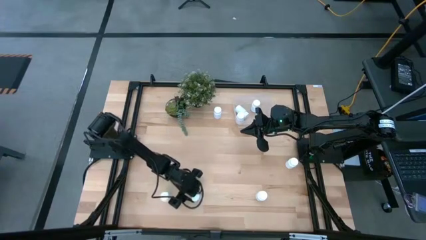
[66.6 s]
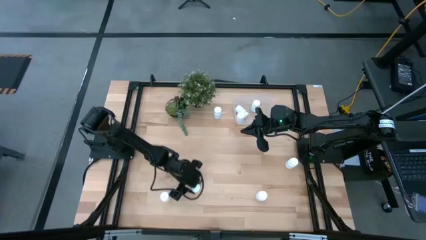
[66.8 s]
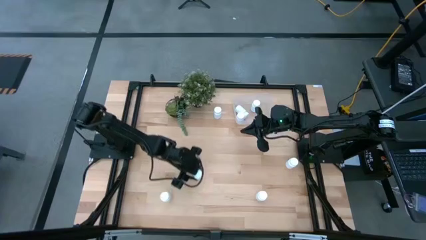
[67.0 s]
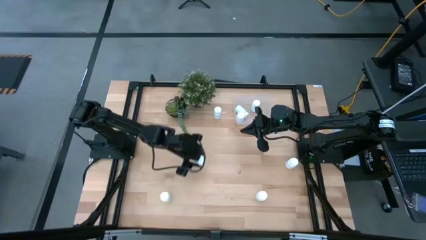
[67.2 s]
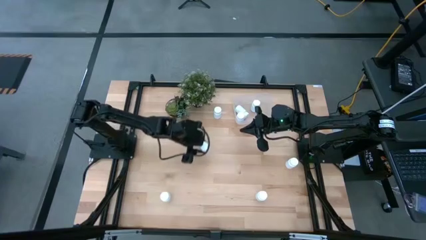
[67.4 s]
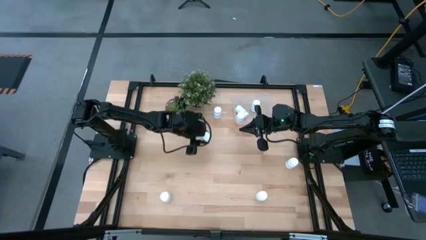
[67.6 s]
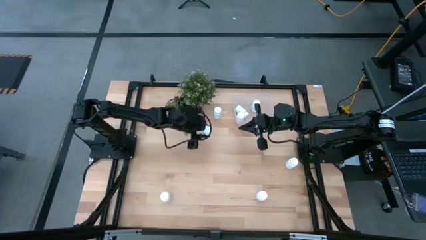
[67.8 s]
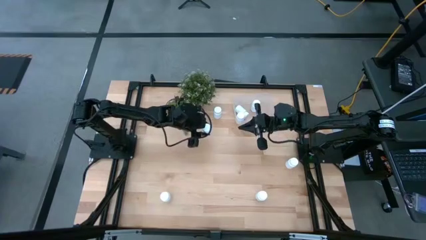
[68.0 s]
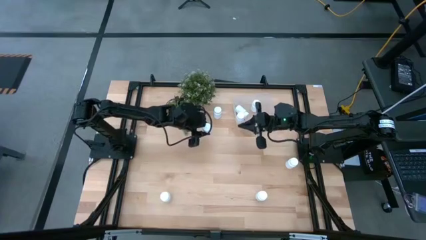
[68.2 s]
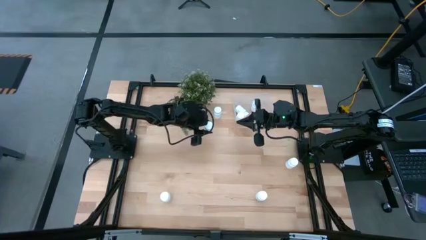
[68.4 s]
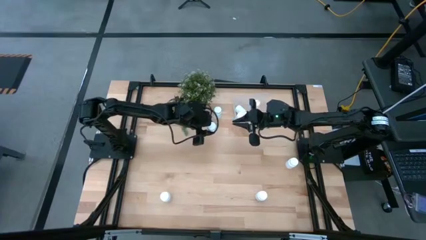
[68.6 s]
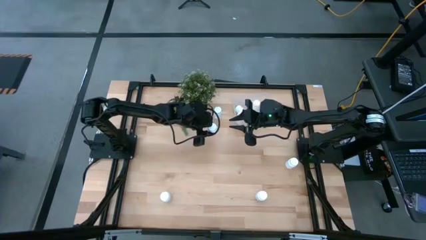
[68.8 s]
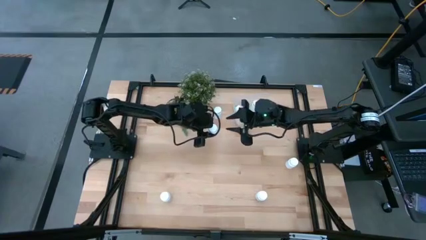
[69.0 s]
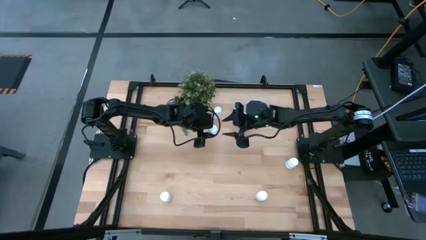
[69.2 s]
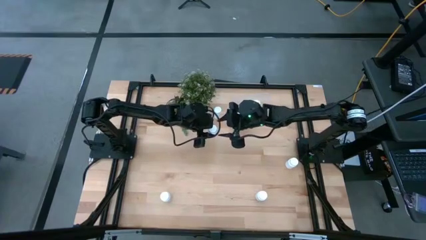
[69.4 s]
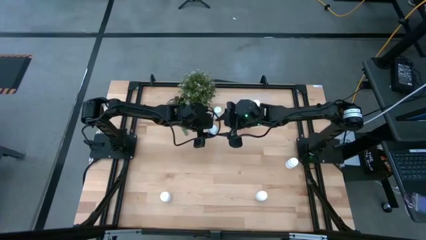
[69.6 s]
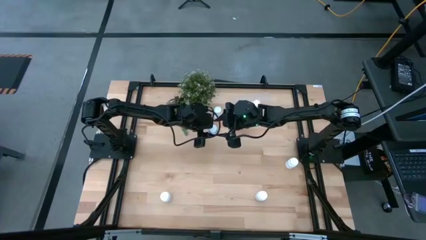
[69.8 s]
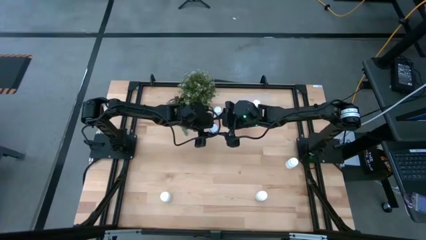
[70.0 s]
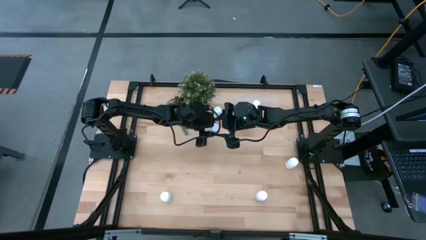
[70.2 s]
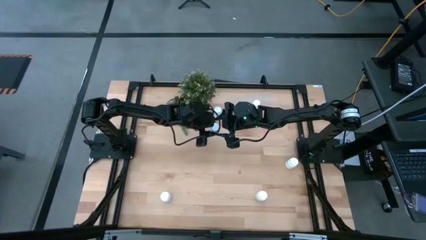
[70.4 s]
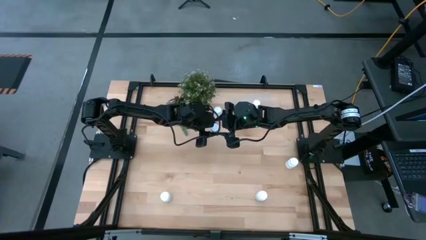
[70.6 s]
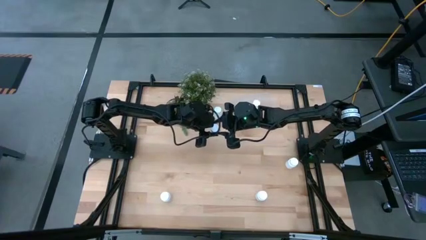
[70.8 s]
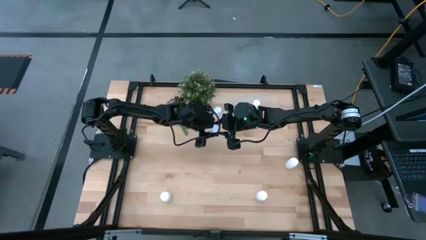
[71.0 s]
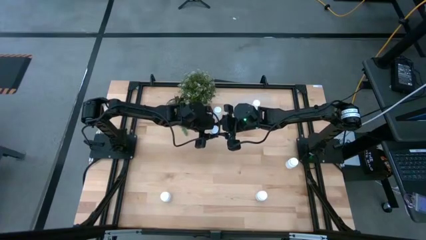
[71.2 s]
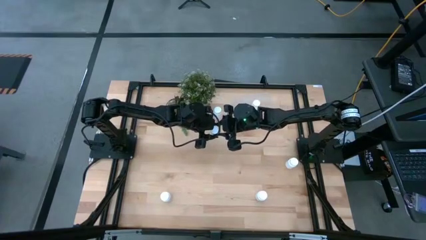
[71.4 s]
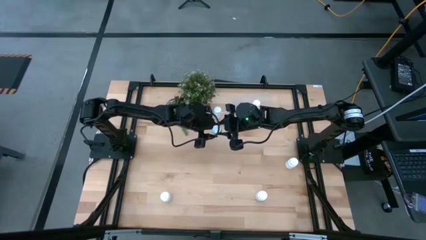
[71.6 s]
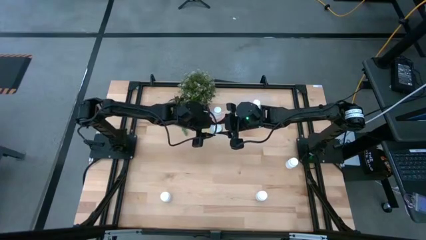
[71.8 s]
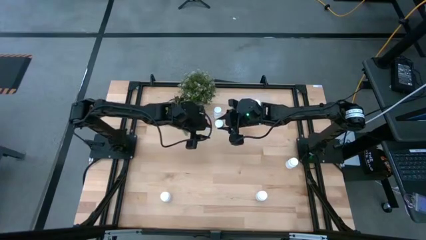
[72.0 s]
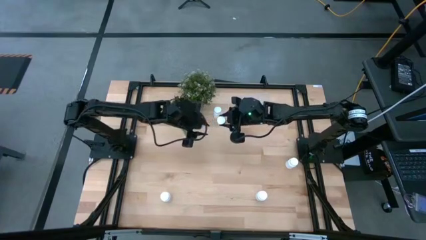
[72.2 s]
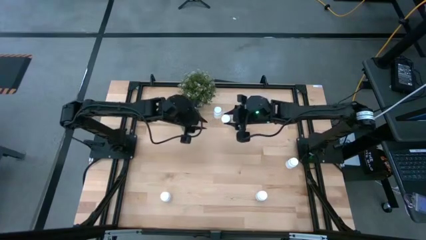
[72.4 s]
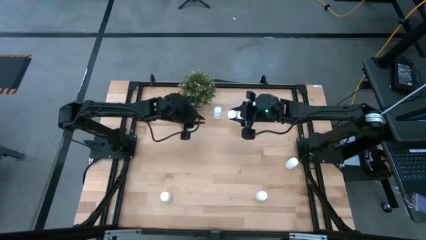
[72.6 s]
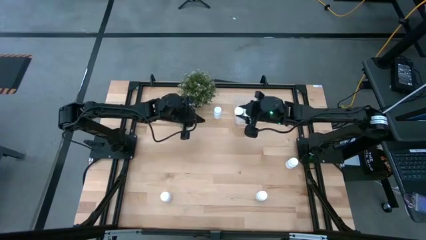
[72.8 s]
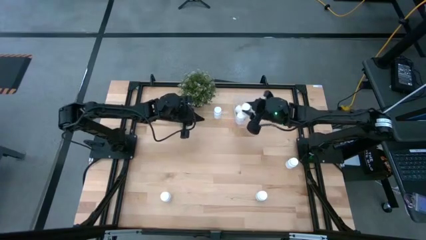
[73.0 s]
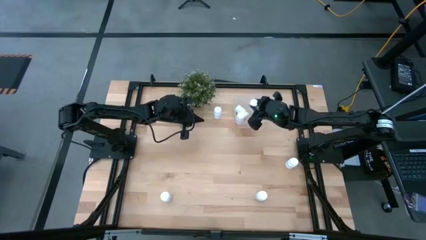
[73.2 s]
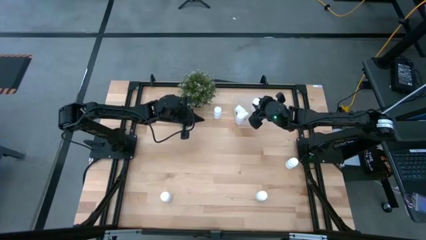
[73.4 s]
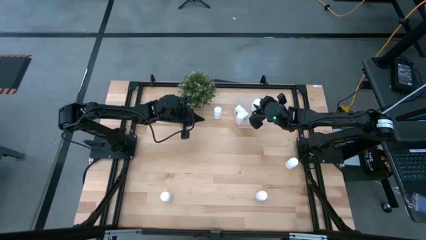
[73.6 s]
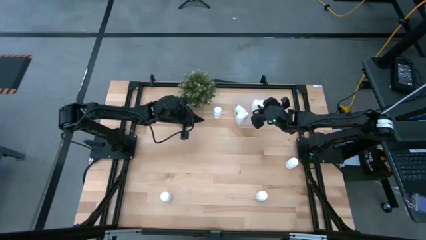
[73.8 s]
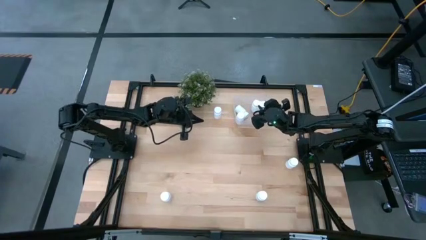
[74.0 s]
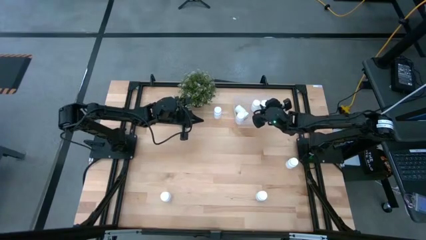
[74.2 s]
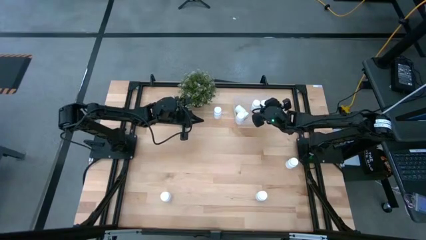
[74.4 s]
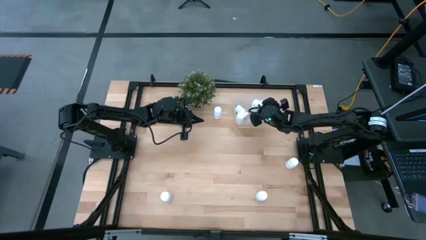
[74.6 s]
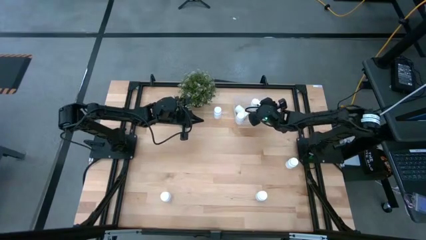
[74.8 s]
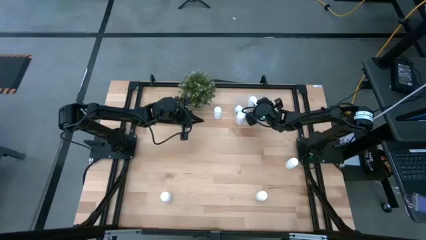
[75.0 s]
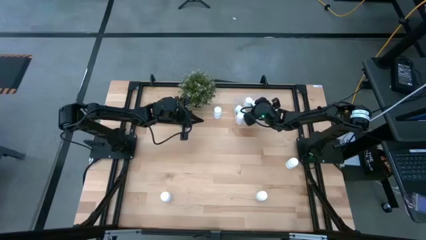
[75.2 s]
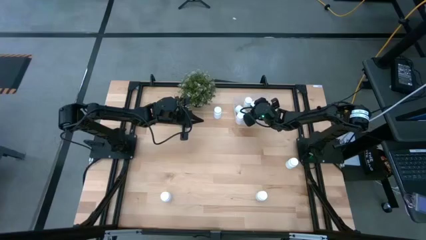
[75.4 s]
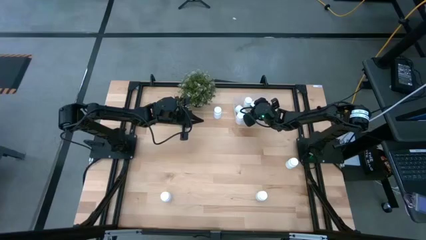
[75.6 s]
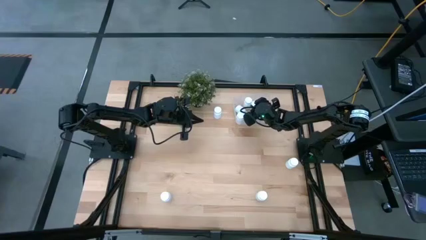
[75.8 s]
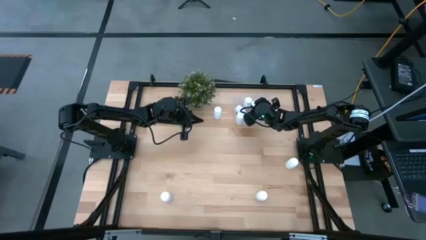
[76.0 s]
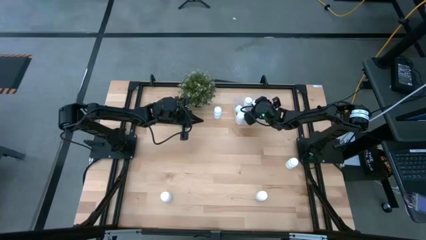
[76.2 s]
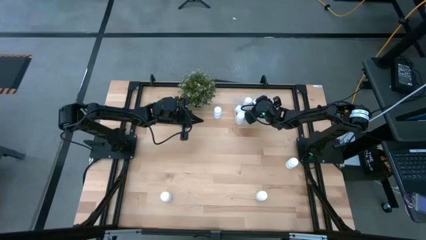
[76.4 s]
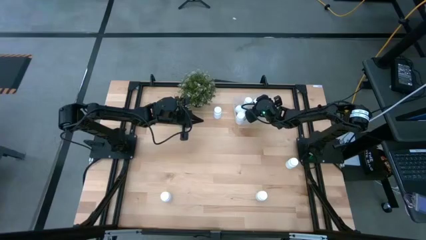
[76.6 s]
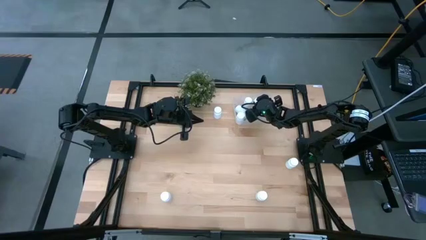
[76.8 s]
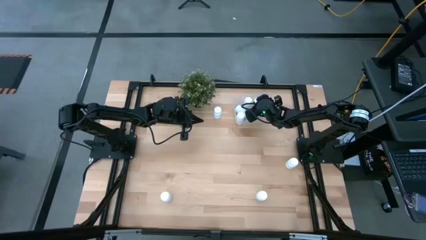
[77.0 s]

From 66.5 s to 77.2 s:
Task: Pick and place pill bottles into a basket
Put the white pill bottle into the transparent bin

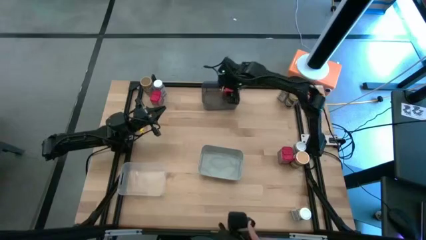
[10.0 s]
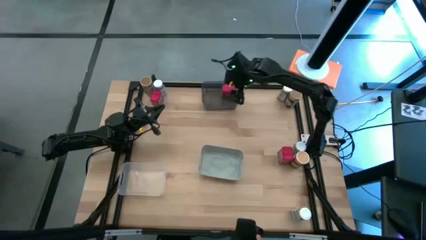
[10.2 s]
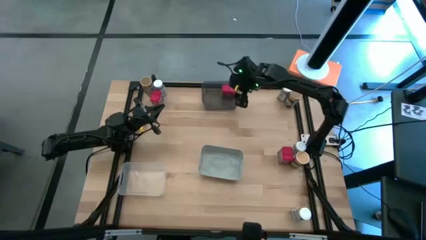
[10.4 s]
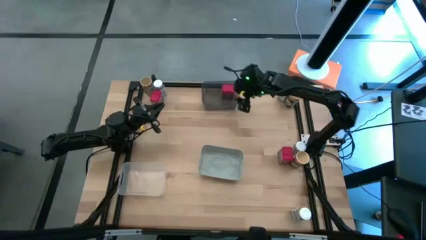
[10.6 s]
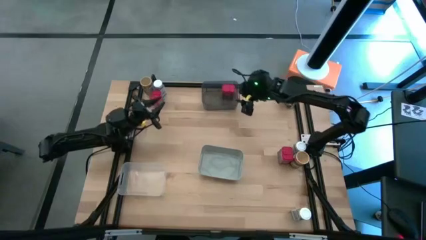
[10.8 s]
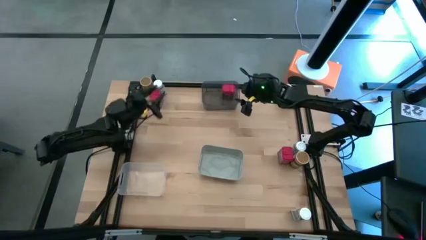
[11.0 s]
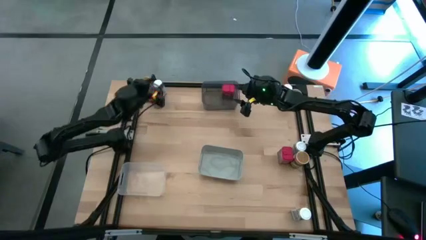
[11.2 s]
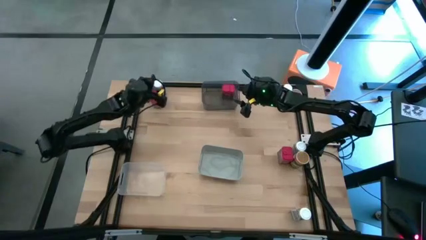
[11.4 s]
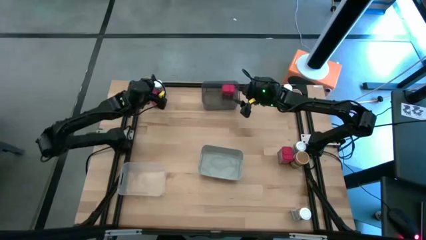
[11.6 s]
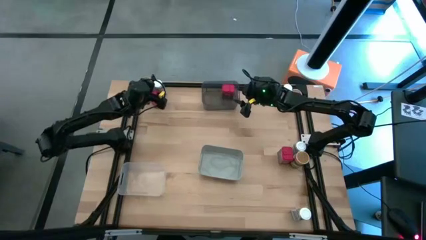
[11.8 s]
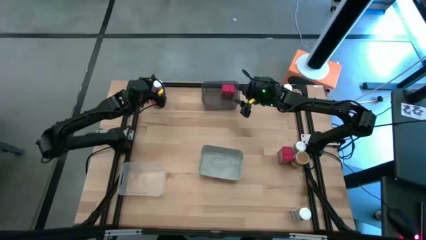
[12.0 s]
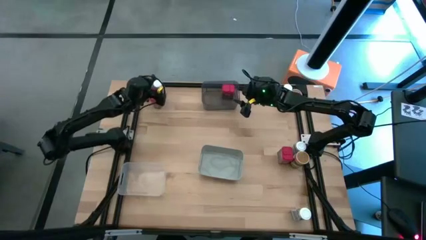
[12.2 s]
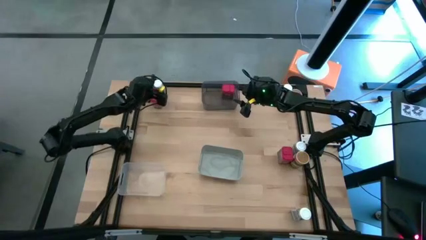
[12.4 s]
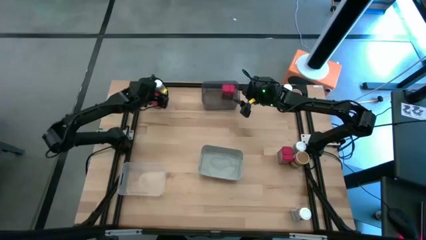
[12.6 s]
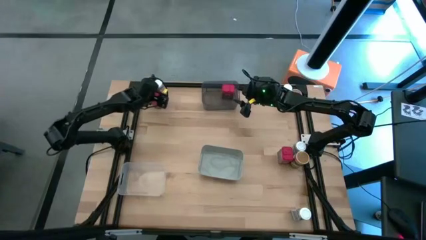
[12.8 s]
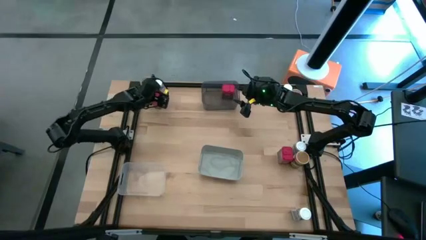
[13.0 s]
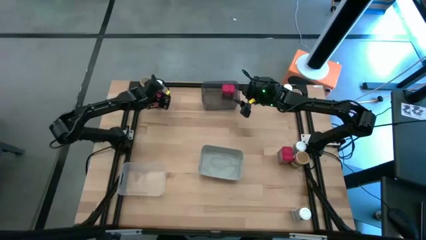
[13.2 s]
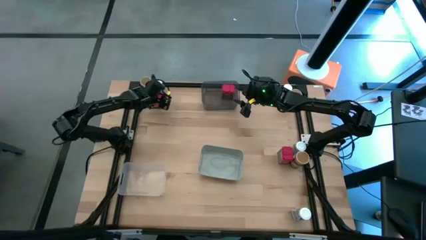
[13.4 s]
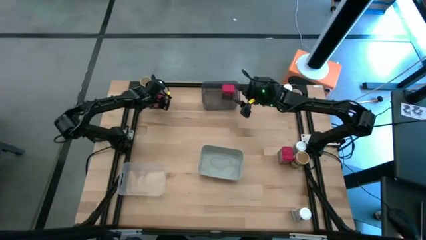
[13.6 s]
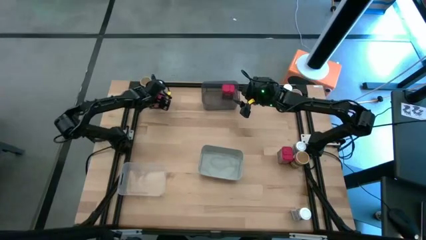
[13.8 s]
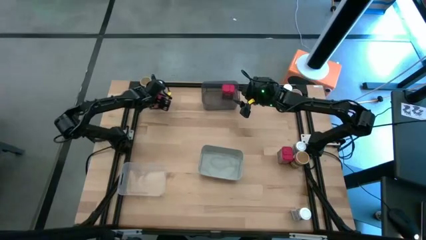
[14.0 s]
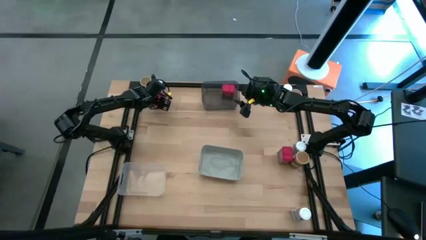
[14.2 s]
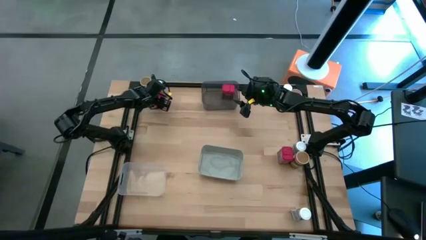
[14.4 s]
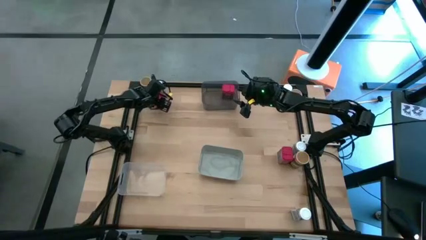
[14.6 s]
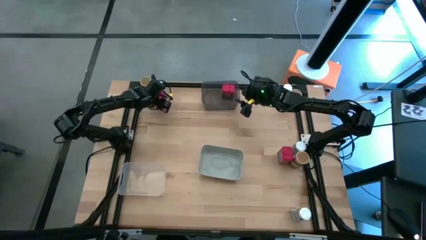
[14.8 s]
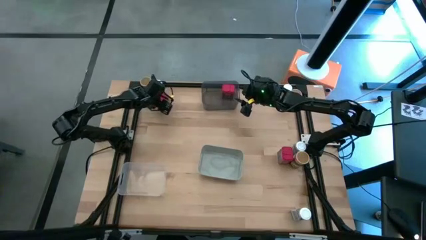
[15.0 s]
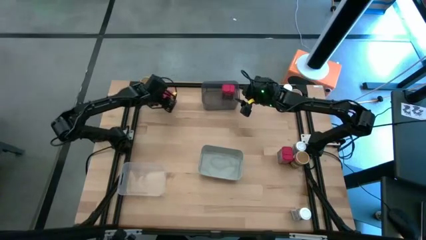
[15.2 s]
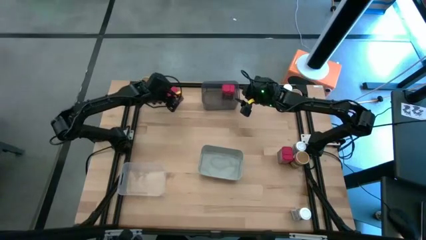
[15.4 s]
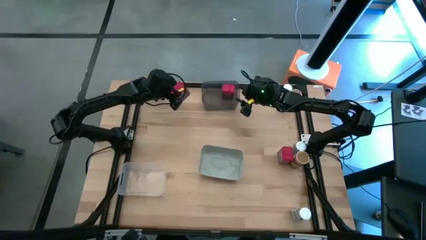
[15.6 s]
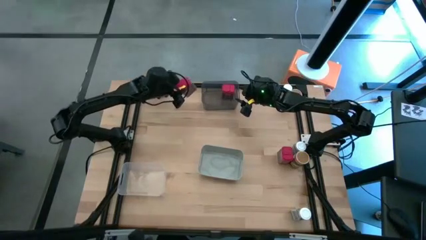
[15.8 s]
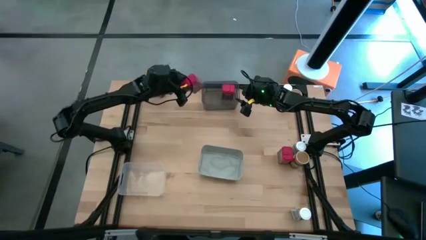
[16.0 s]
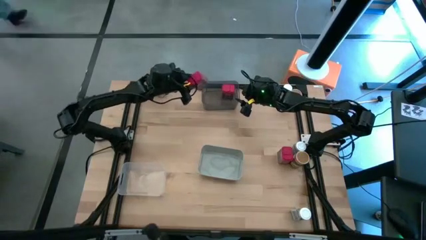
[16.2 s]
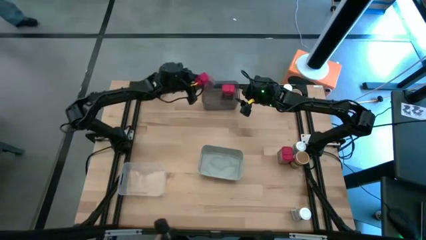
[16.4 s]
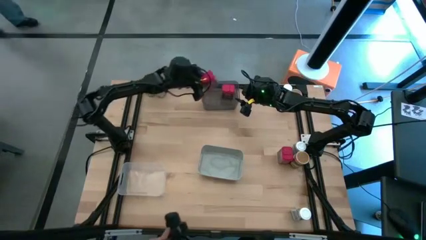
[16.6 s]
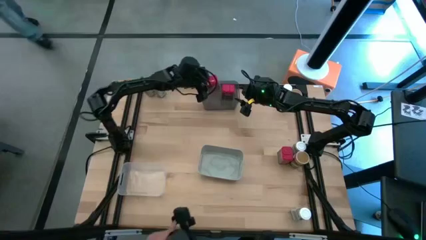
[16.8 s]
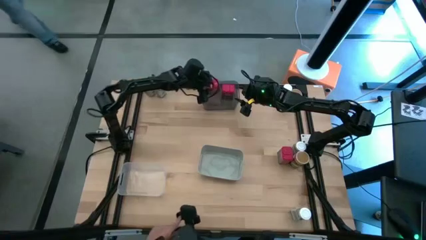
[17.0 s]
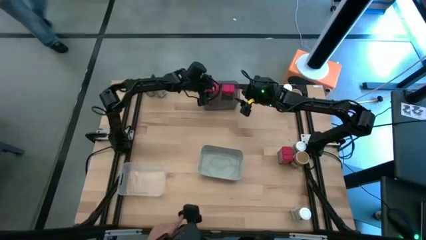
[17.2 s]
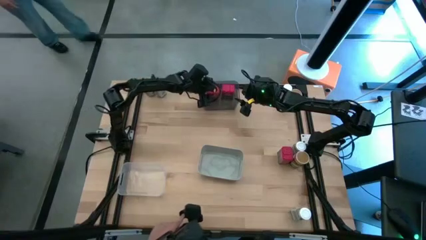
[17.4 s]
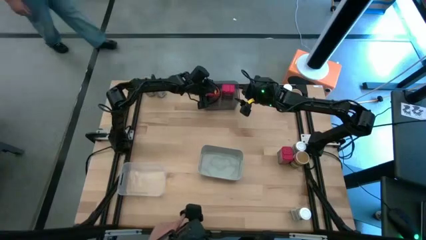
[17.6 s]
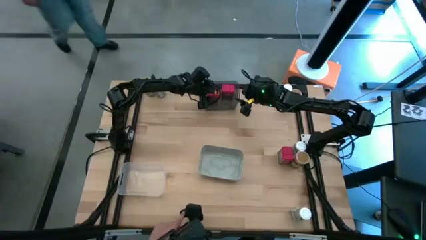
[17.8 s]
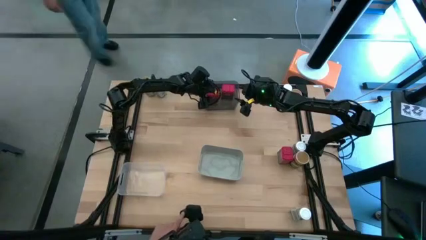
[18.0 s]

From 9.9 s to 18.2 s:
Task: Sort spices by type
Put the left red seasoning can into the black bin
